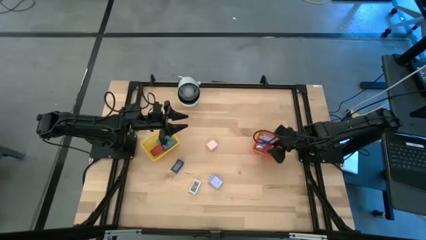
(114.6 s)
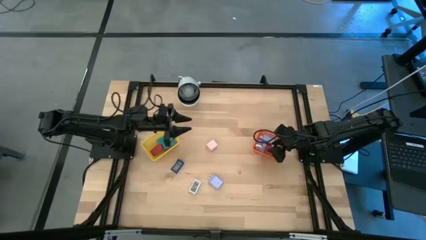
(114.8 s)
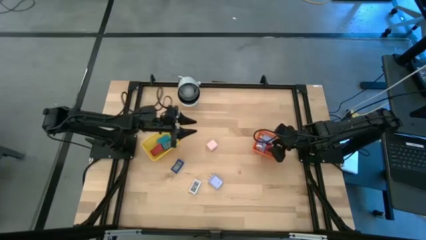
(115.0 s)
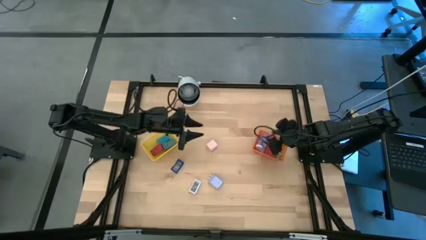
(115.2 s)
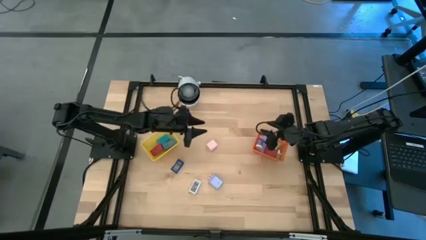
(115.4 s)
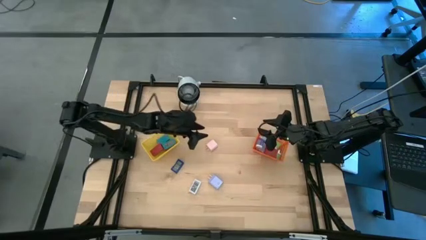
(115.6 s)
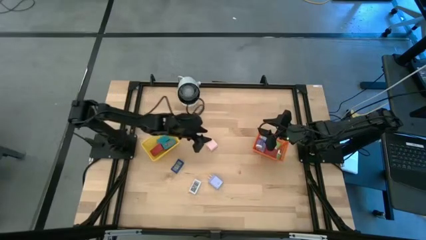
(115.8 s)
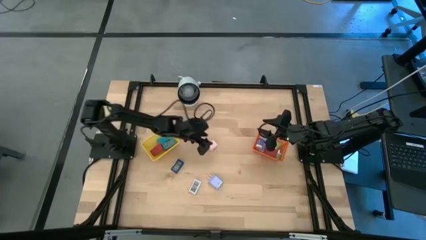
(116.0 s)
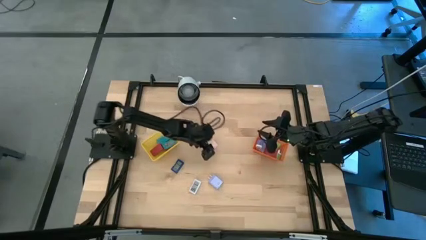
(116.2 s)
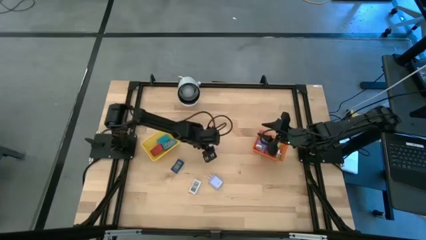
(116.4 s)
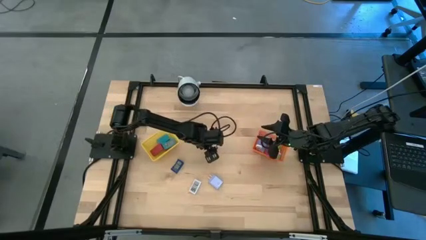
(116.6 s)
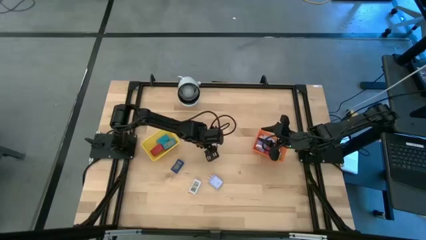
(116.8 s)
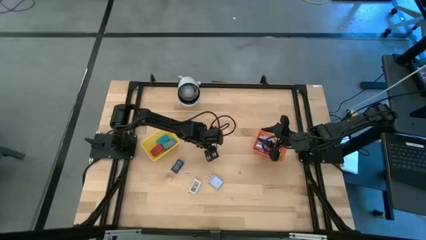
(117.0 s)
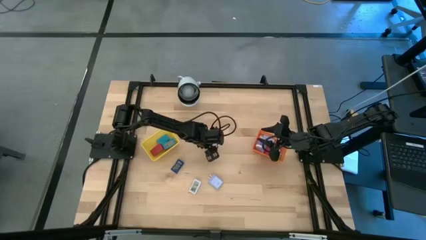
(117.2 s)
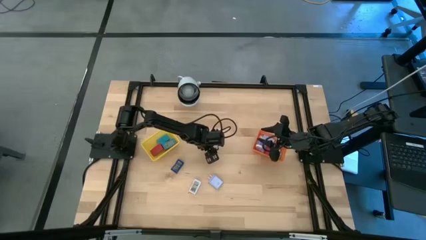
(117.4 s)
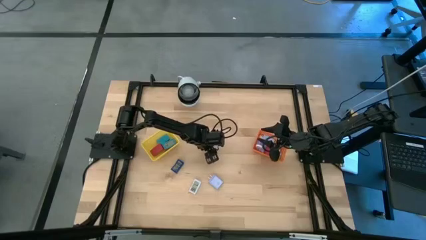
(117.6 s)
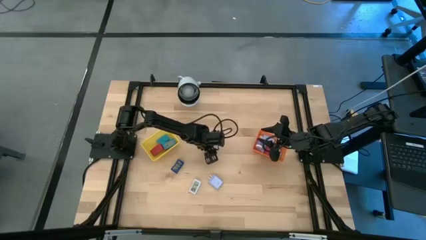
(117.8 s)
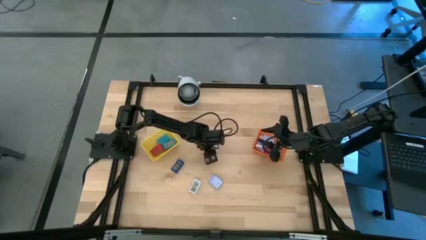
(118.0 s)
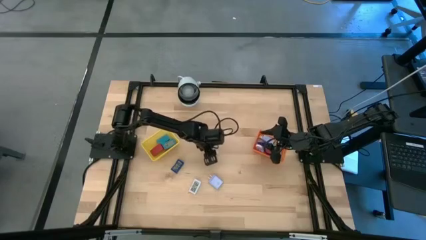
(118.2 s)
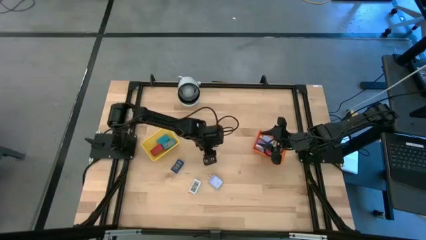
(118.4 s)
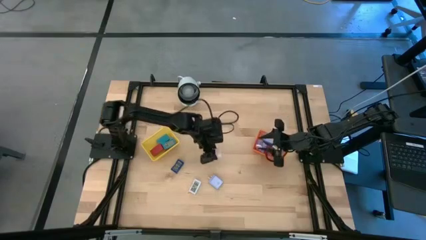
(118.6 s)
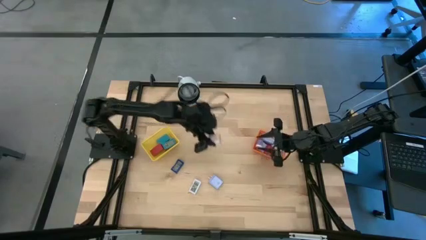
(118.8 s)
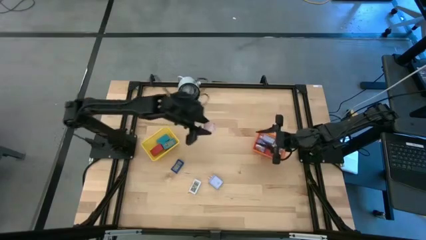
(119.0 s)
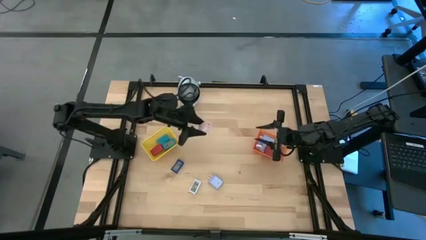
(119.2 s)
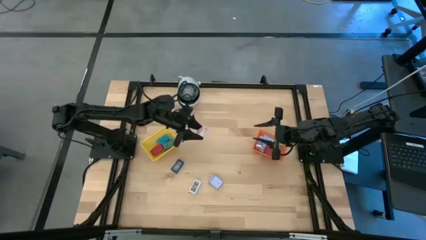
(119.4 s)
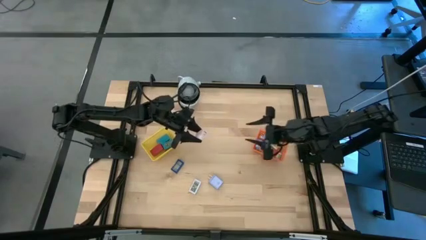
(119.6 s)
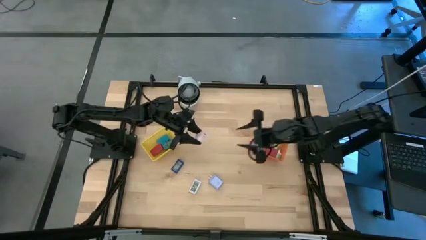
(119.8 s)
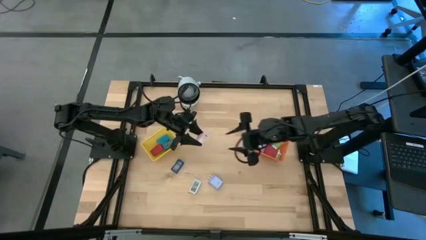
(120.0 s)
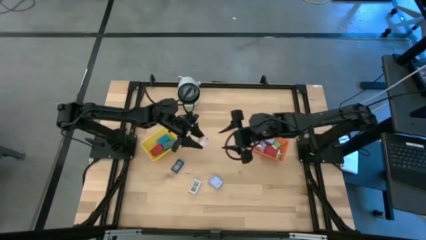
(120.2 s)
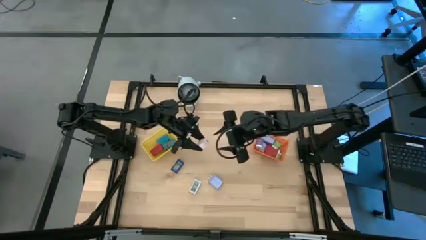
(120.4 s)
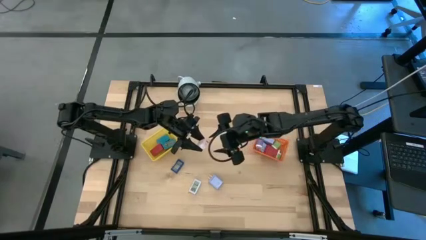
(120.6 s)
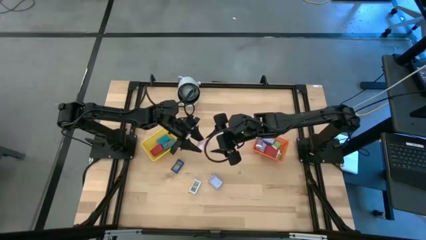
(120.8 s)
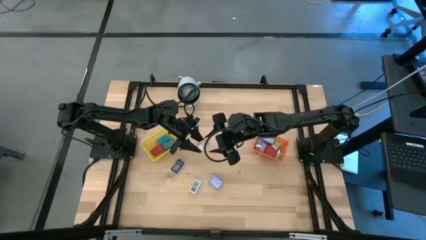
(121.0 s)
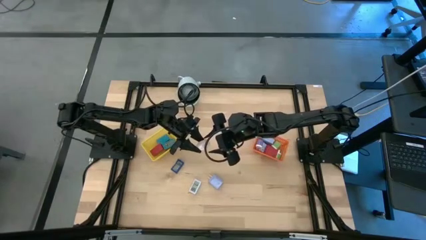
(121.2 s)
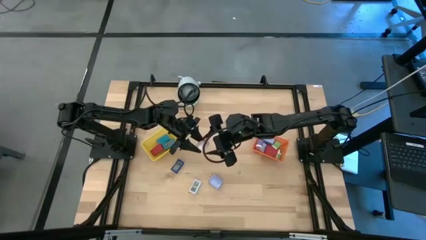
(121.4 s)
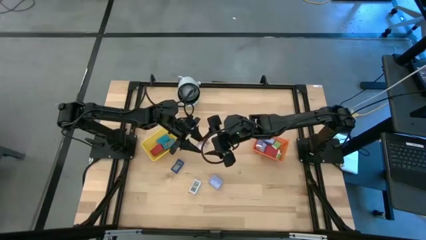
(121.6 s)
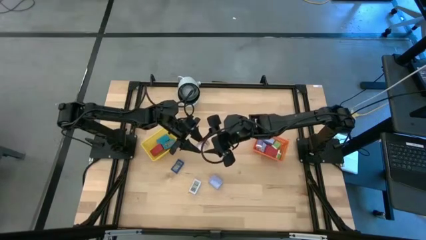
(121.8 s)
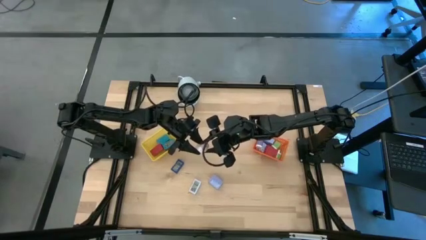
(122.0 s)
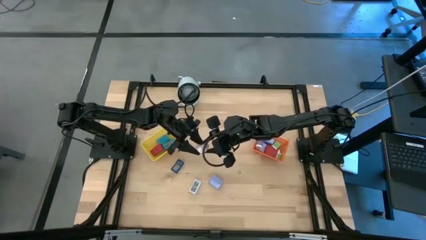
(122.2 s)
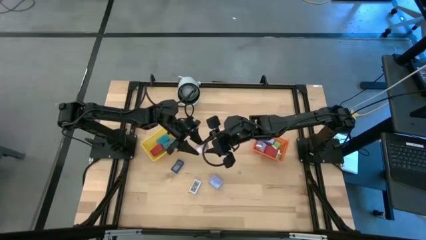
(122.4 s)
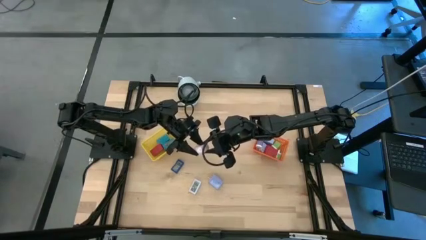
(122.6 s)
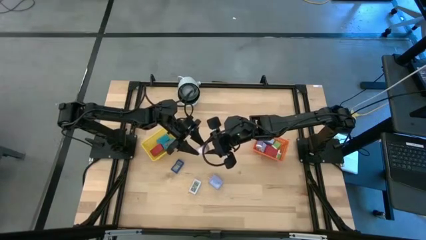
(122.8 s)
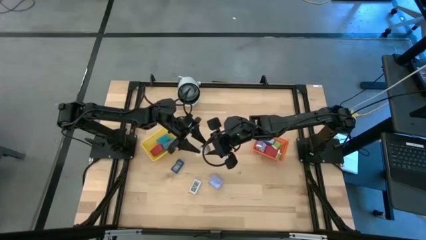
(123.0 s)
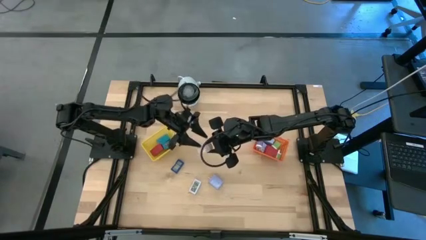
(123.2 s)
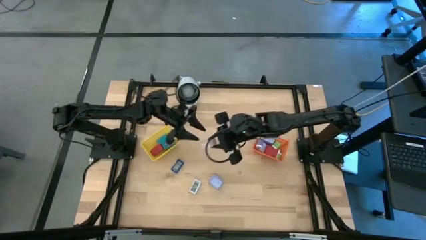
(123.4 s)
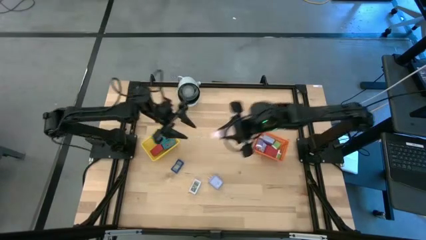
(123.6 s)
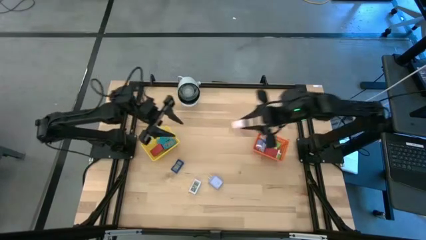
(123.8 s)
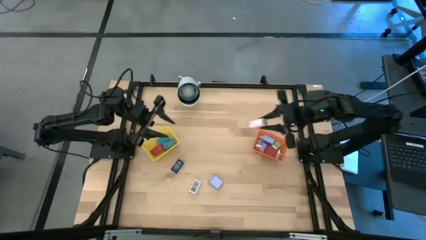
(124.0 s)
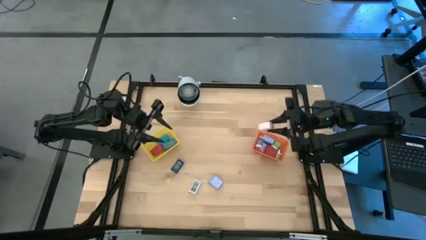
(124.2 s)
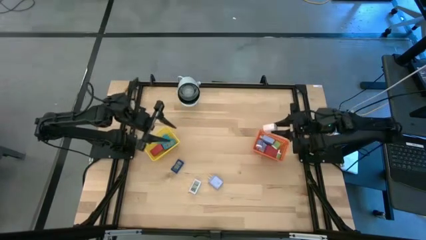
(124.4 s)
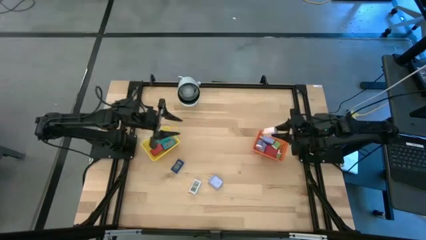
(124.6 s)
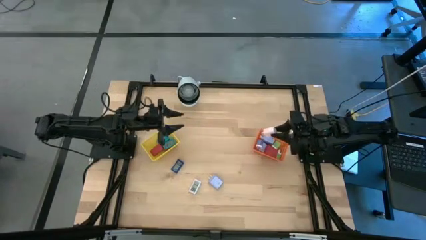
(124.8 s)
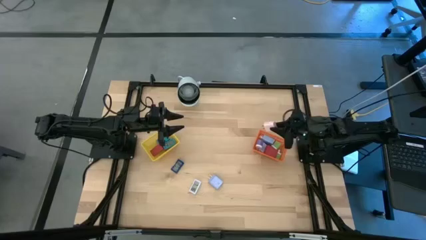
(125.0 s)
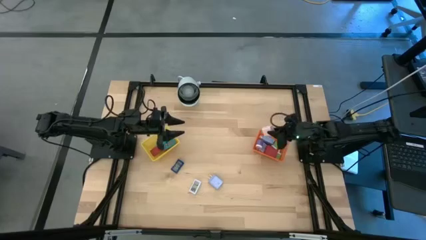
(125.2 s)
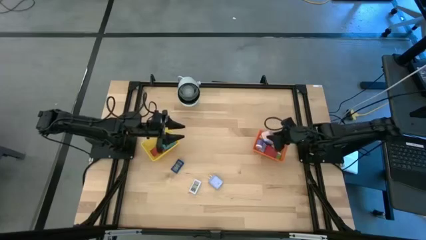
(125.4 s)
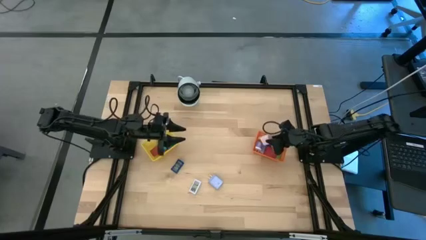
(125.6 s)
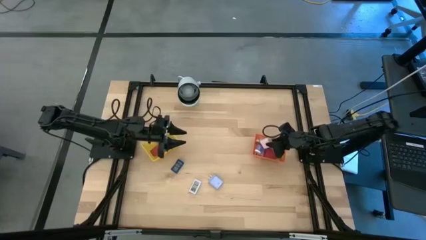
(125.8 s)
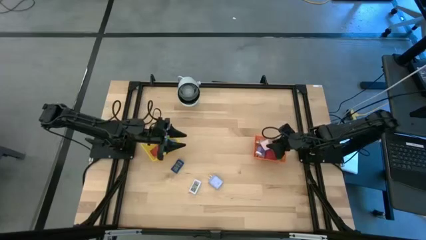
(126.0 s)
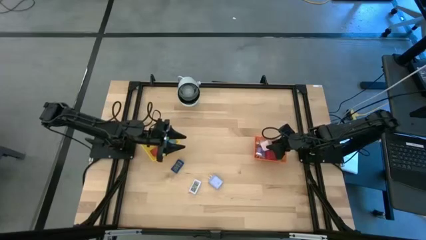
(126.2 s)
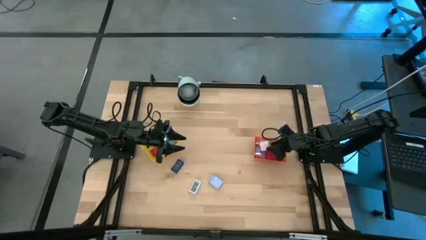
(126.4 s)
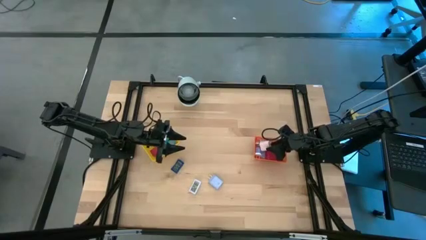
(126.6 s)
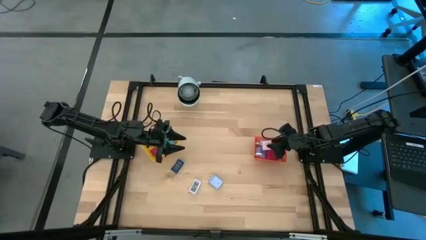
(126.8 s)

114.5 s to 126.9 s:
Task: Pick & Place Office items
Put the pink charger adapter into the orange basket

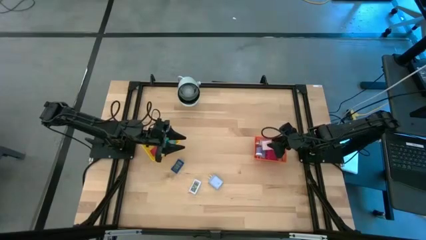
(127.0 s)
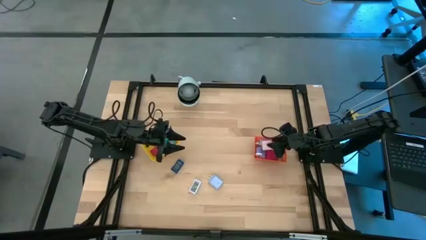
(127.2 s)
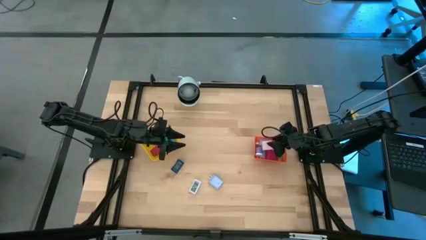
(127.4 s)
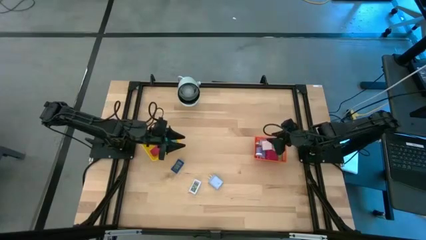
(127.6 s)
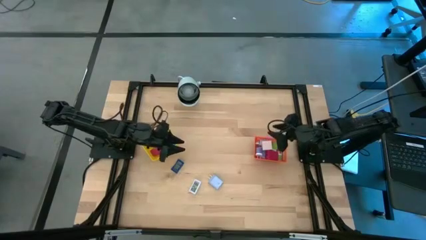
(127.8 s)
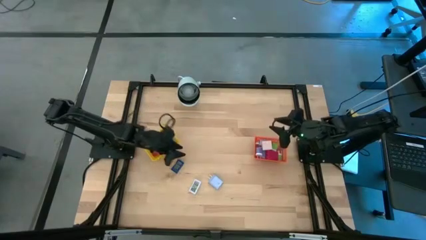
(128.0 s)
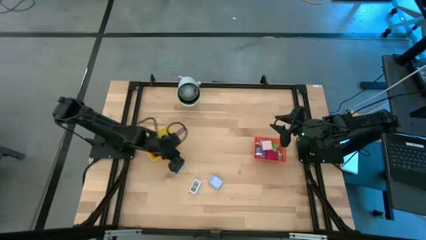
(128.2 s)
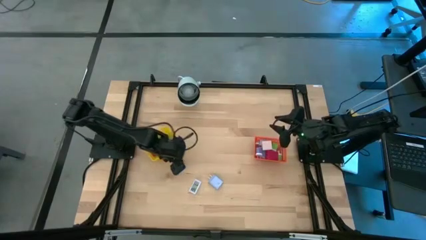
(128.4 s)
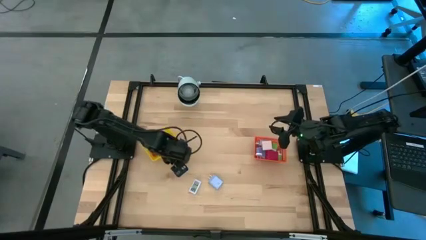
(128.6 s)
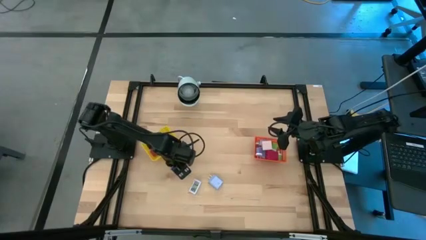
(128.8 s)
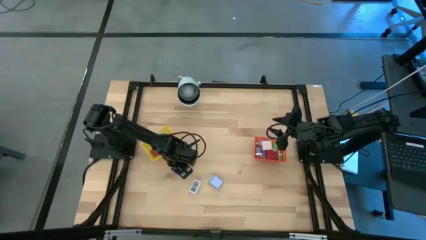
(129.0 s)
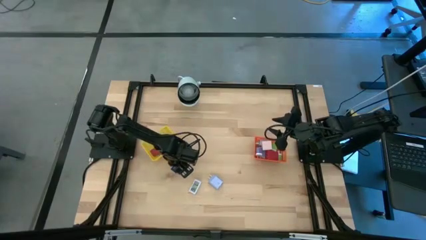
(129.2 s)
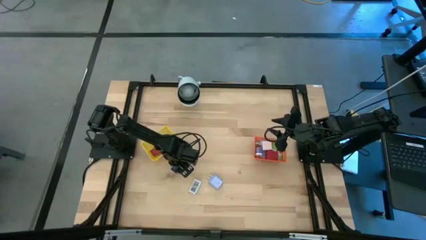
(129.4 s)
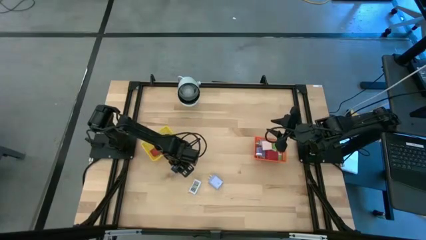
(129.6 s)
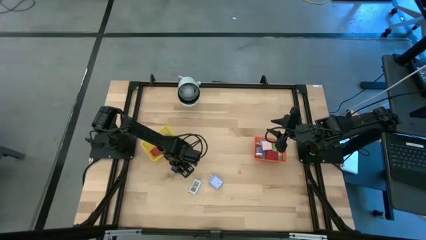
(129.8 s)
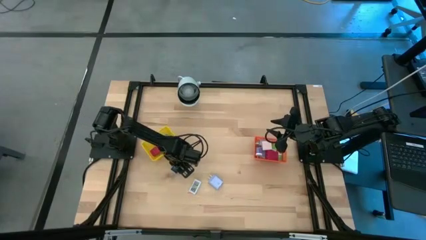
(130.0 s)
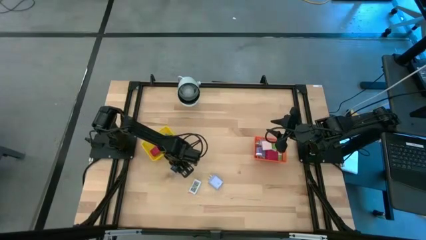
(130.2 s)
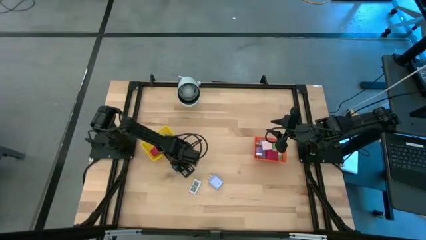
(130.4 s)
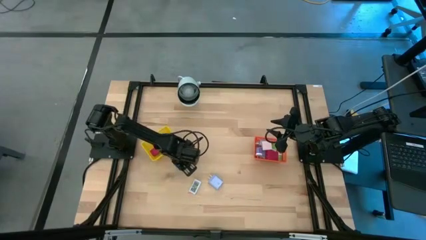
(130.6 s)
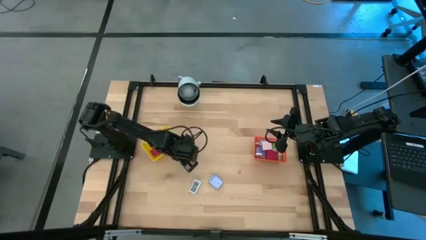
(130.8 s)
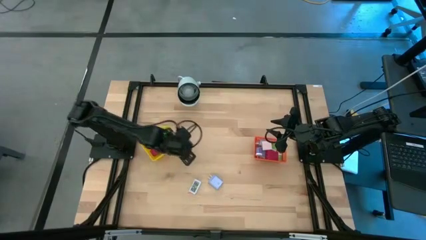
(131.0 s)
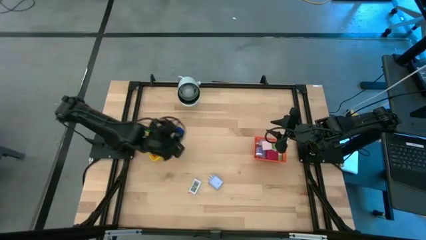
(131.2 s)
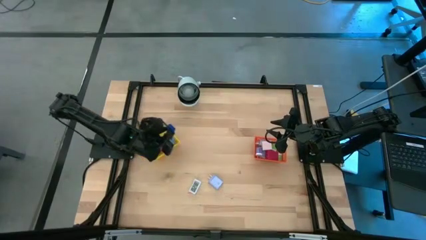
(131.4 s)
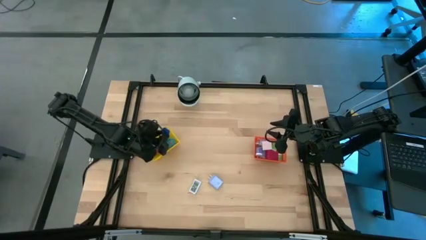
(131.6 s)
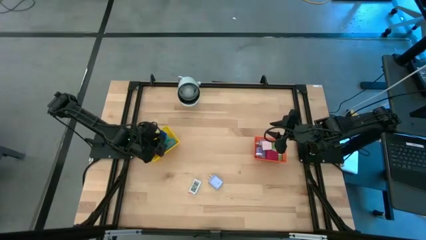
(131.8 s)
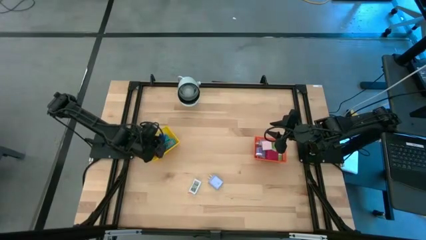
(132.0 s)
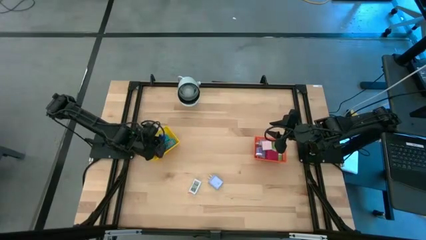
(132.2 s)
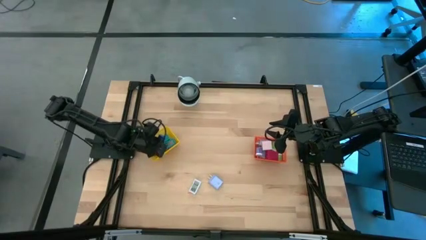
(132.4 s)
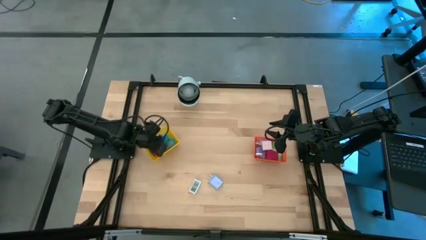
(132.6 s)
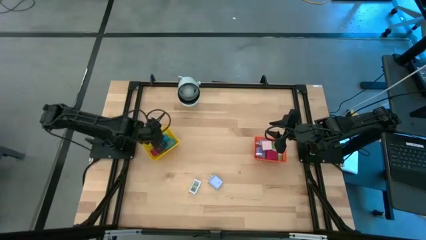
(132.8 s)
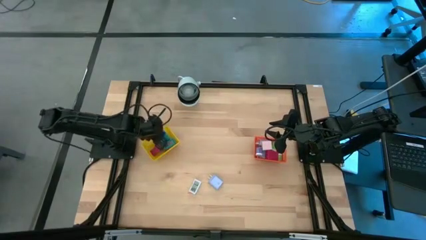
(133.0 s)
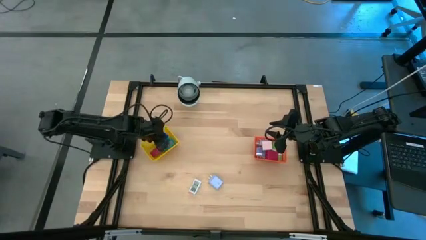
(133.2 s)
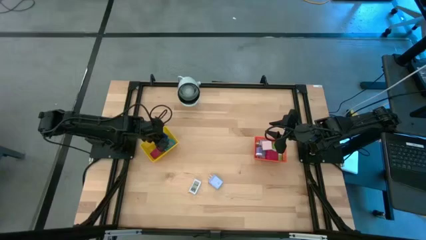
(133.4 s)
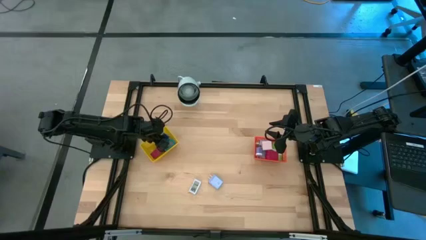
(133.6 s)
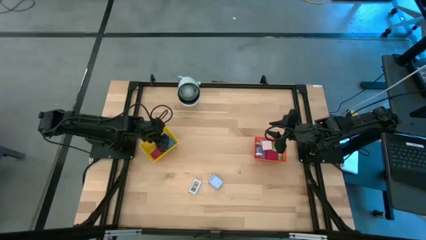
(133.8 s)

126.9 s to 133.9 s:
Put the dark blue digital timer into the yellow basket
